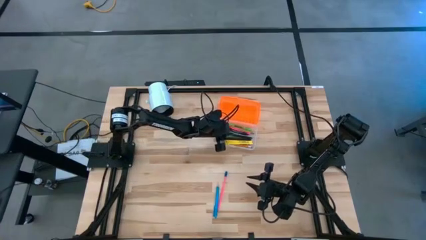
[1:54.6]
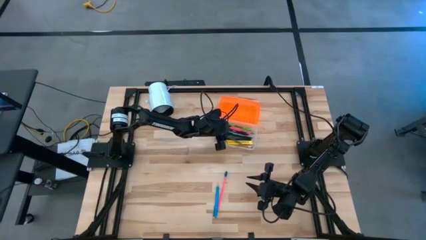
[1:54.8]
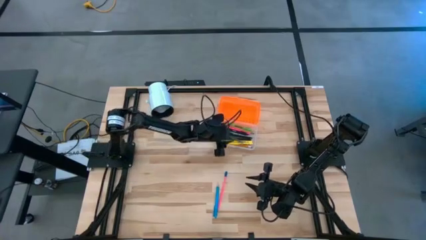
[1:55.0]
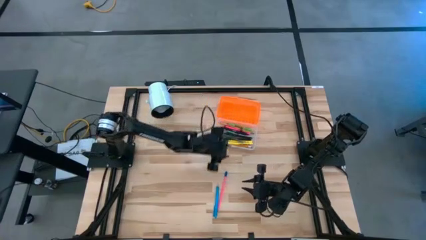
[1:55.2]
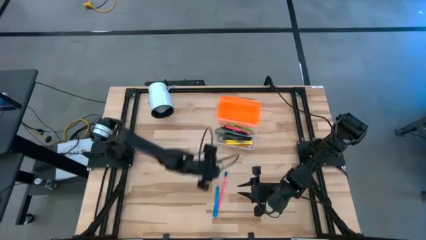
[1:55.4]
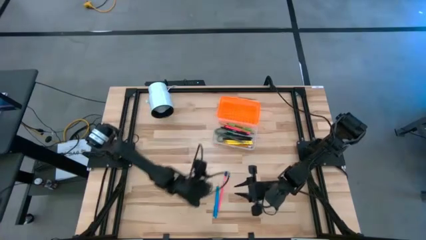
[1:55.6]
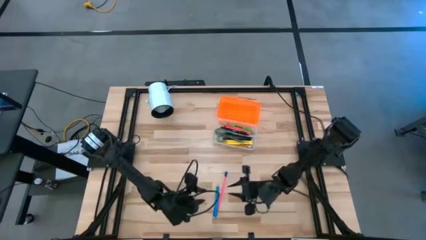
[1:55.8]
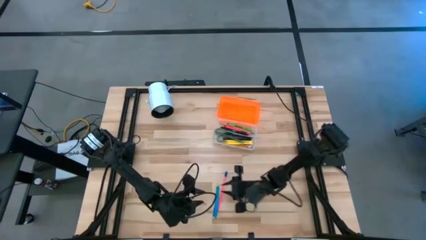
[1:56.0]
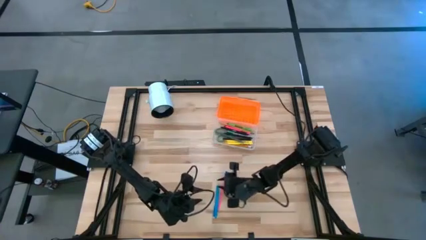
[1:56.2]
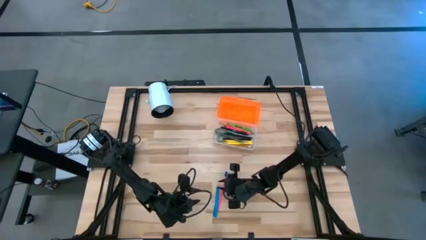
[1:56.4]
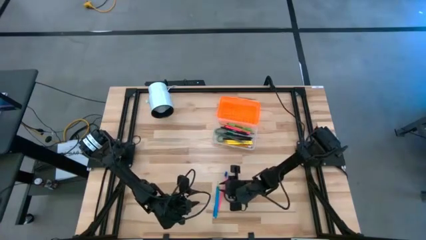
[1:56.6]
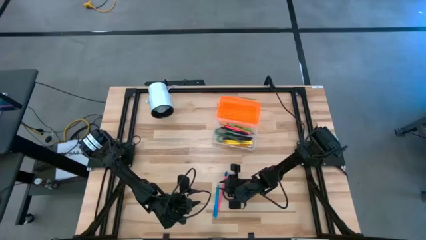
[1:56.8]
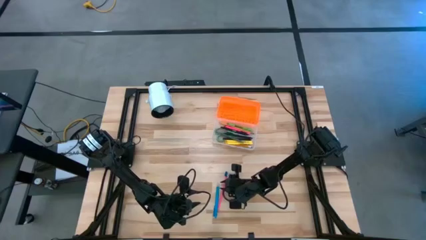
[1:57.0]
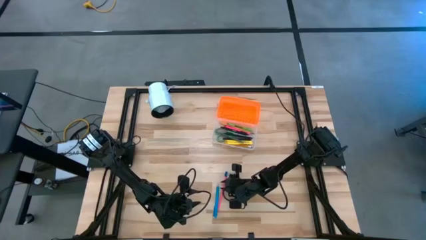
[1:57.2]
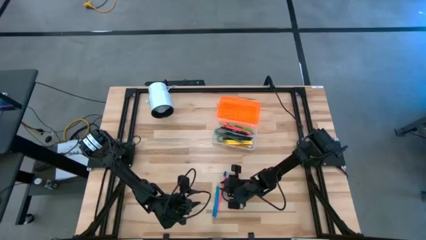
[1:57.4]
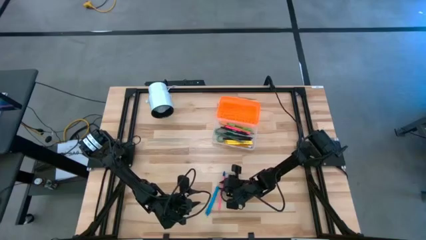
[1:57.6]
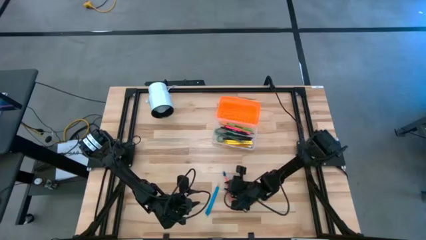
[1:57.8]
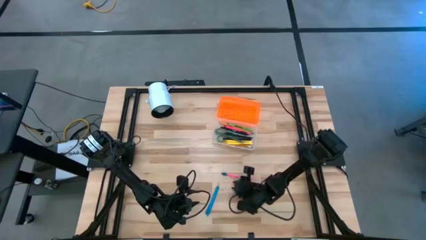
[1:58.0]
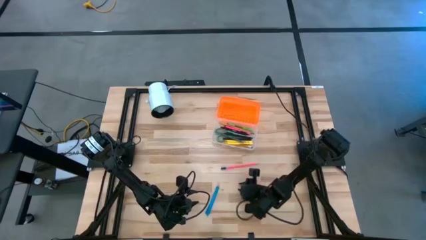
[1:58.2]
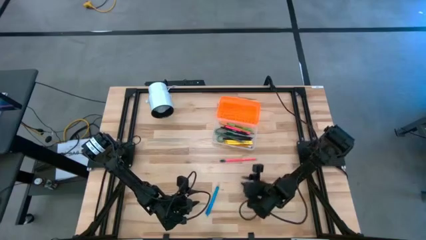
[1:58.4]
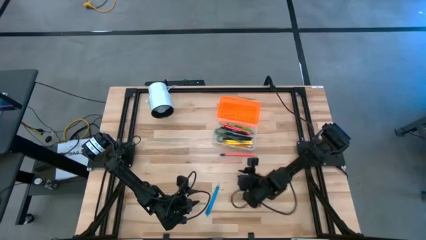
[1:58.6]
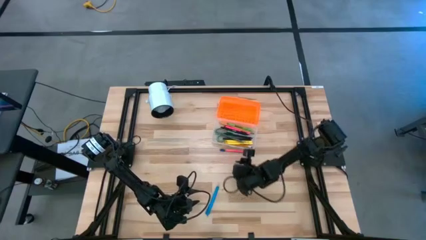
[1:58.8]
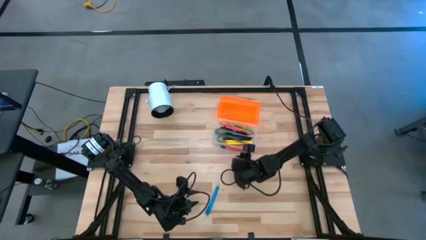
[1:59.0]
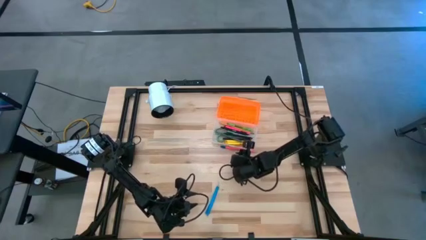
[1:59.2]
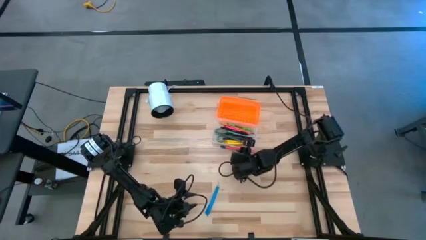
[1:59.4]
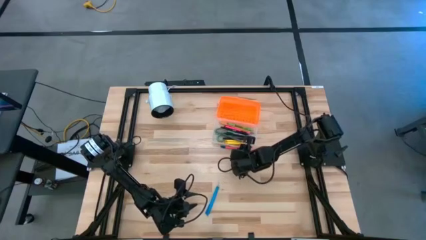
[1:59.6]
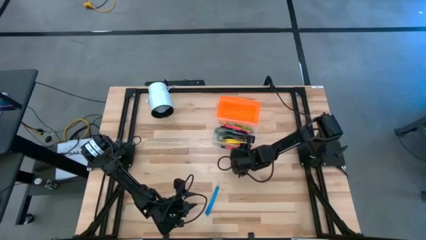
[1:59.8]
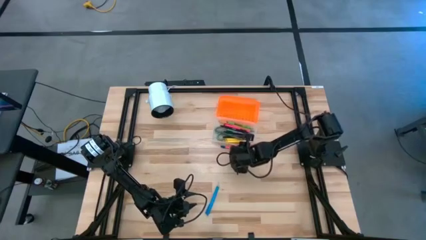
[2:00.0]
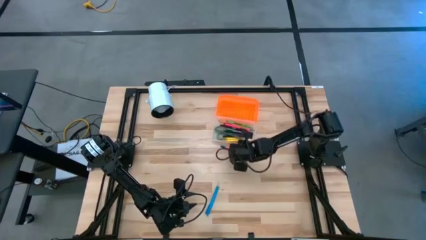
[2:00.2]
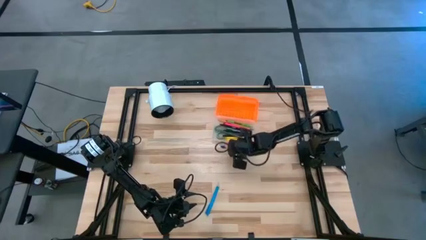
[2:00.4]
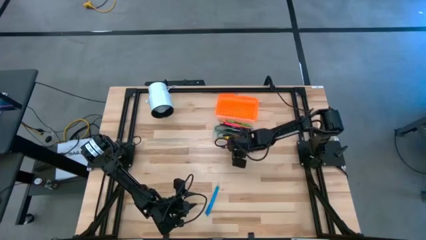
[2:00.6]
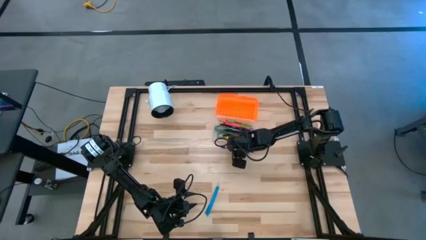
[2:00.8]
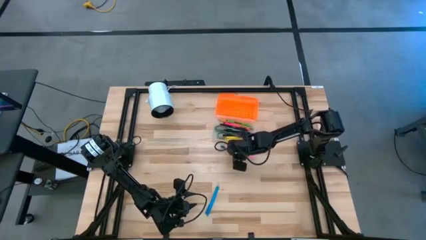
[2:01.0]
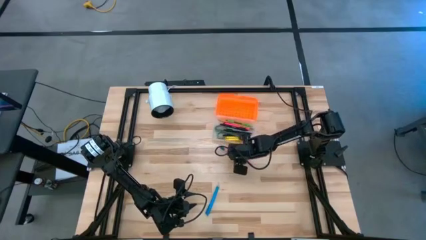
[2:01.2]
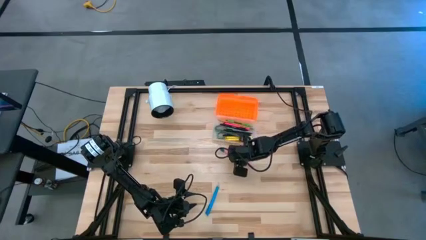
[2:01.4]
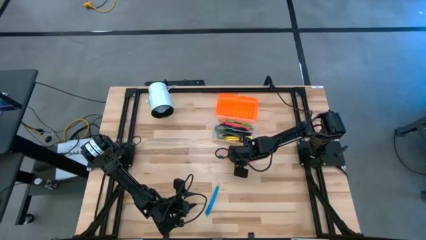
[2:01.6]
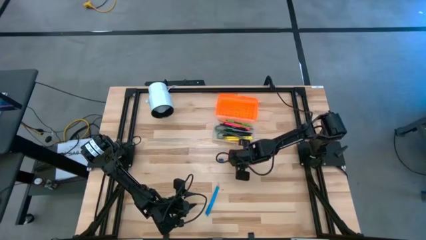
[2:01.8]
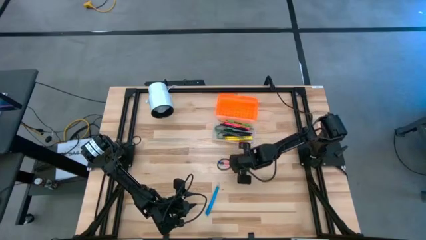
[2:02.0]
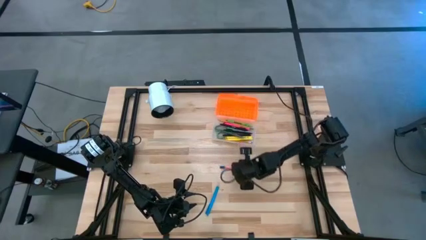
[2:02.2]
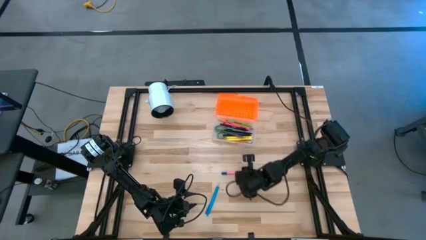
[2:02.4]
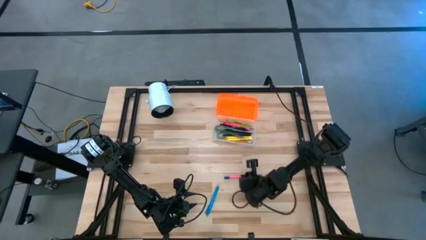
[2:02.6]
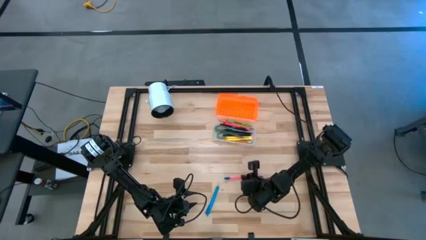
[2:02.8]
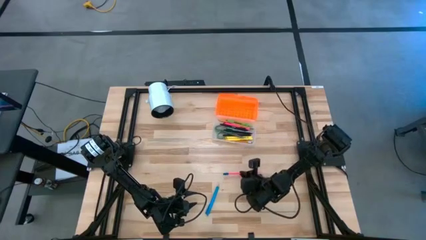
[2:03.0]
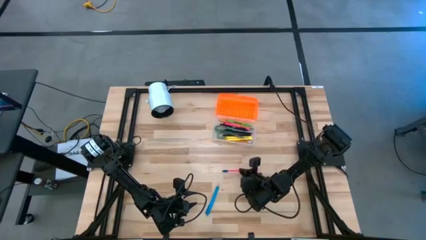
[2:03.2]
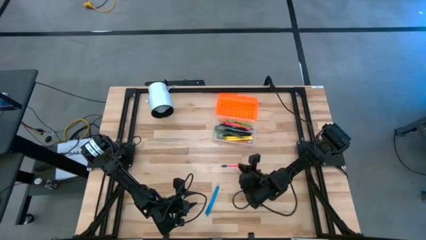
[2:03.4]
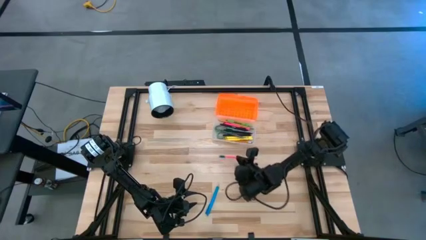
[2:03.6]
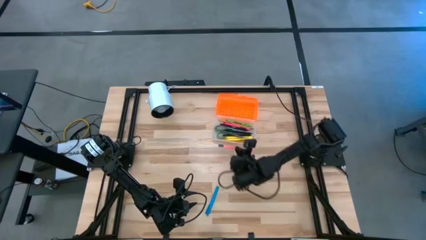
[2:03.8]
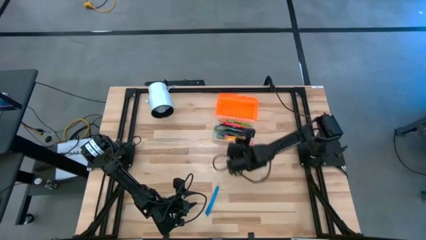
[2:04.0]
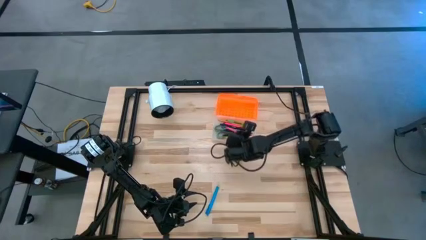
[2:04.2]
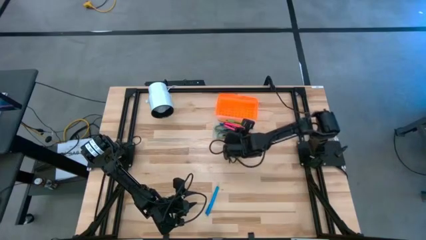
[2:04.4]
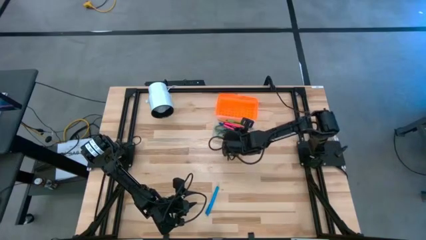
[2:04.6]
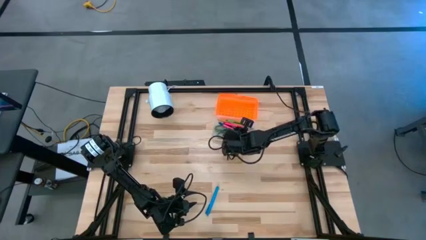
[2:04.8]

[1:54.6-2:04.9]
Task: Pick & place school supplies into a supply box
Put the pink pencil into the supply box

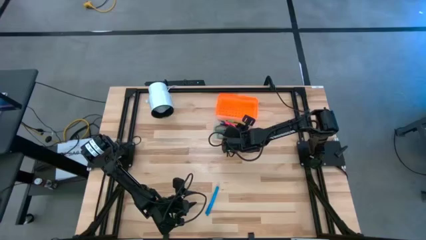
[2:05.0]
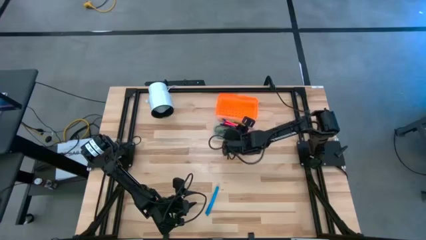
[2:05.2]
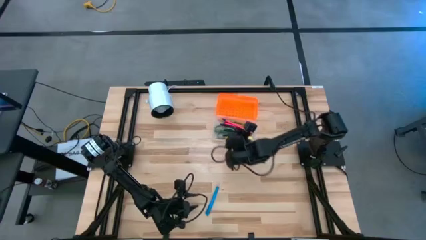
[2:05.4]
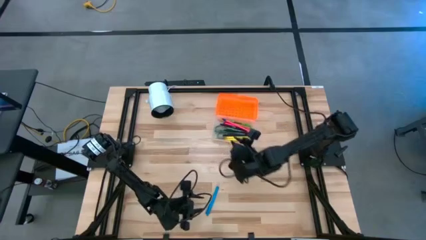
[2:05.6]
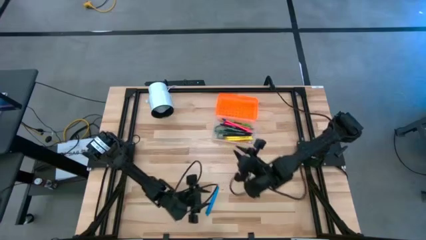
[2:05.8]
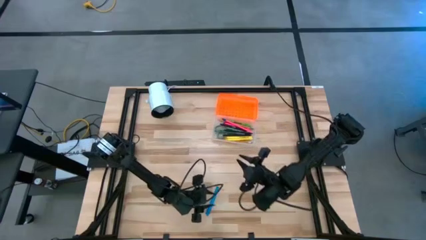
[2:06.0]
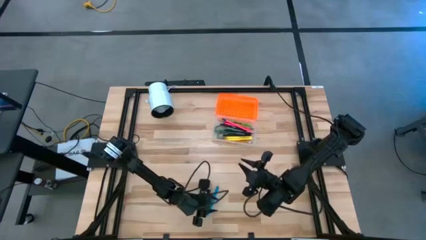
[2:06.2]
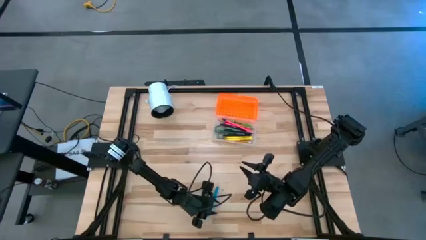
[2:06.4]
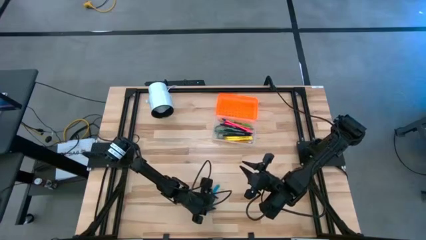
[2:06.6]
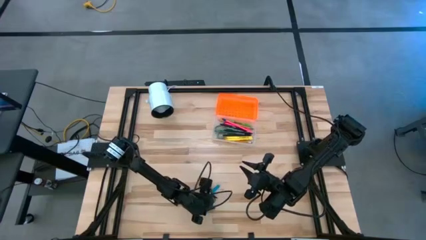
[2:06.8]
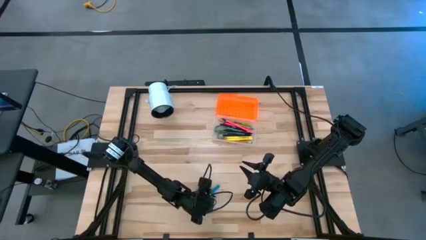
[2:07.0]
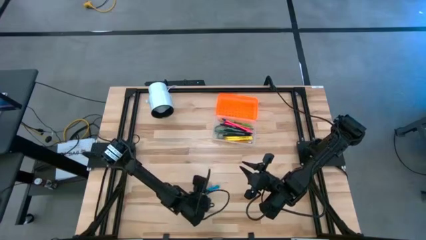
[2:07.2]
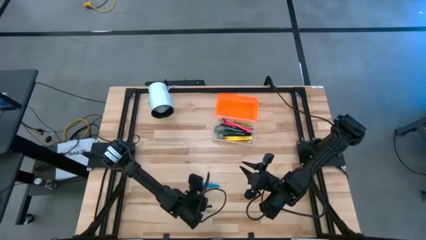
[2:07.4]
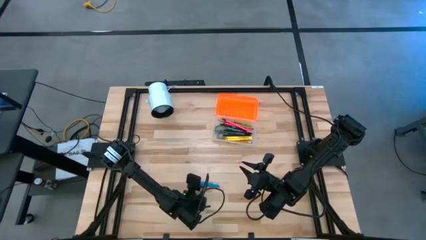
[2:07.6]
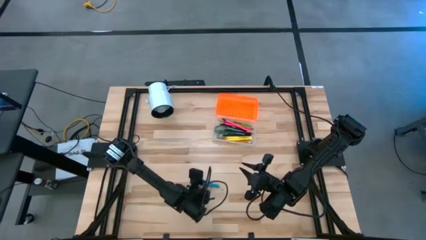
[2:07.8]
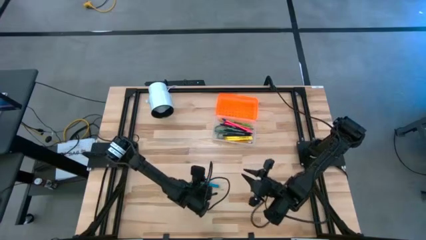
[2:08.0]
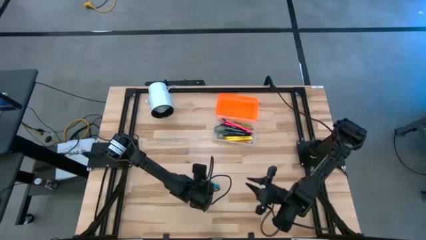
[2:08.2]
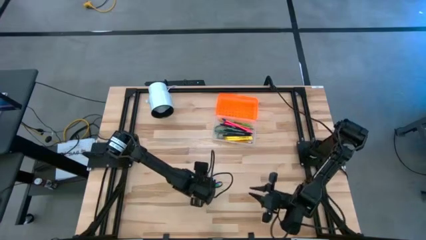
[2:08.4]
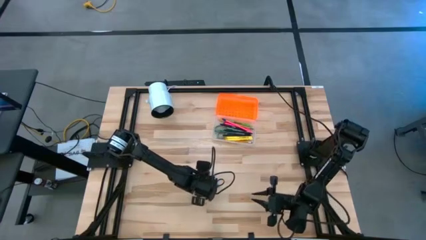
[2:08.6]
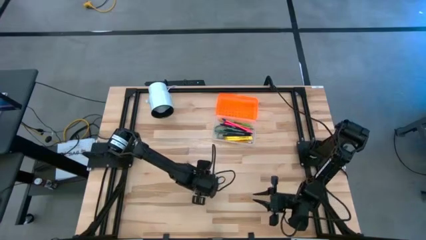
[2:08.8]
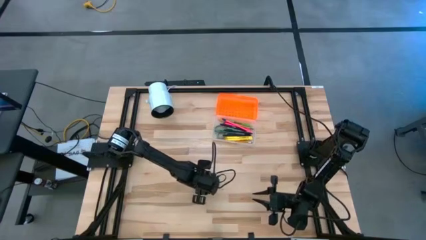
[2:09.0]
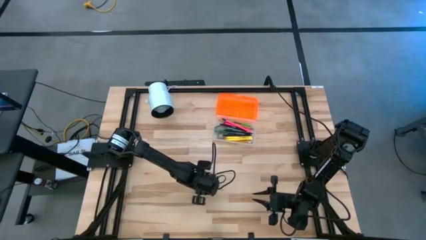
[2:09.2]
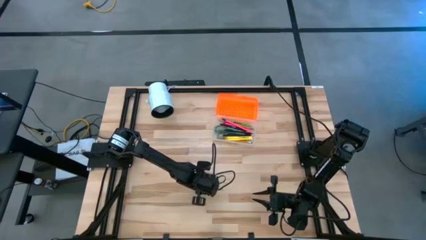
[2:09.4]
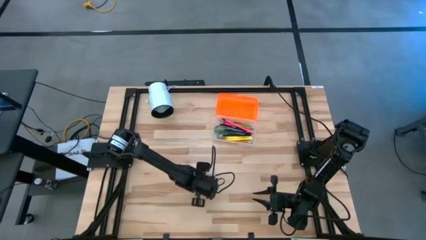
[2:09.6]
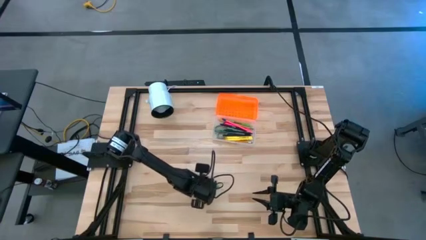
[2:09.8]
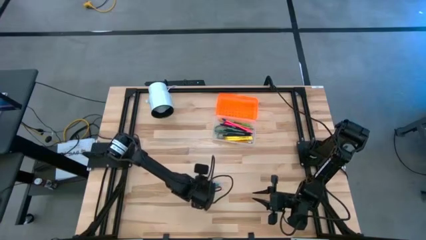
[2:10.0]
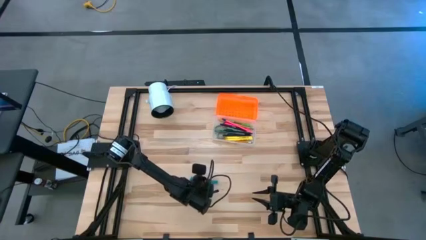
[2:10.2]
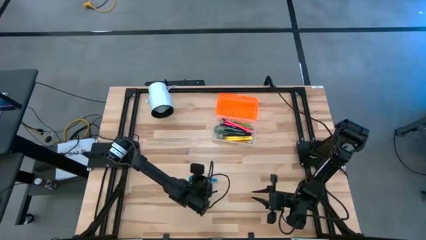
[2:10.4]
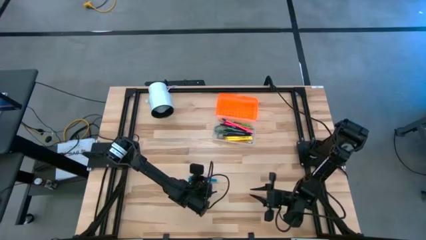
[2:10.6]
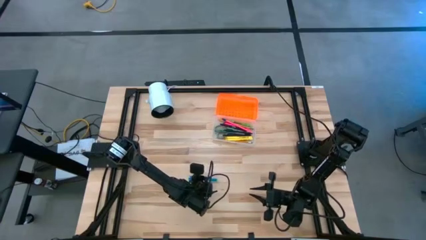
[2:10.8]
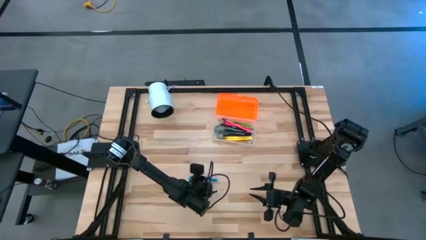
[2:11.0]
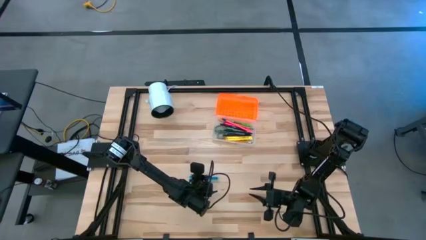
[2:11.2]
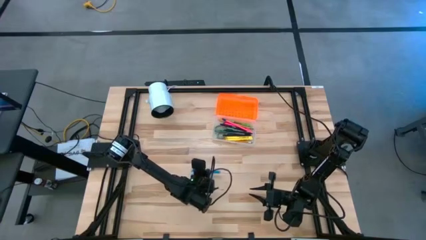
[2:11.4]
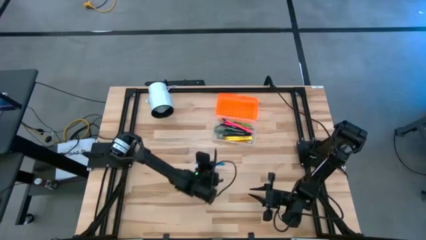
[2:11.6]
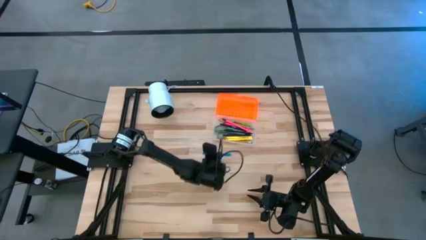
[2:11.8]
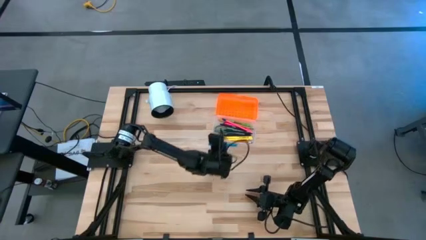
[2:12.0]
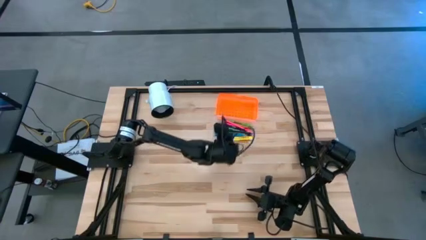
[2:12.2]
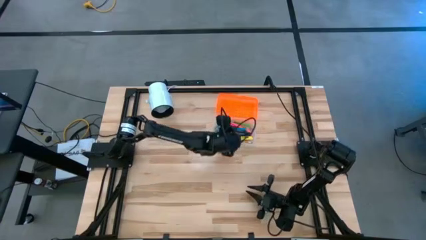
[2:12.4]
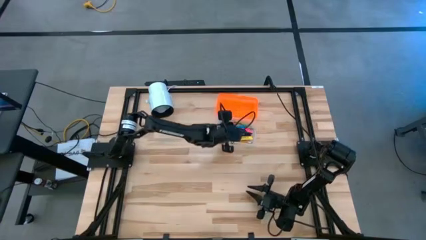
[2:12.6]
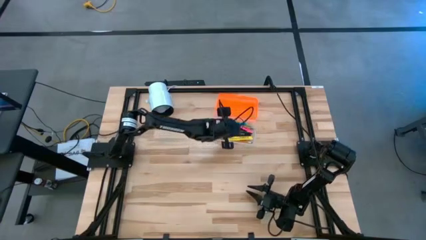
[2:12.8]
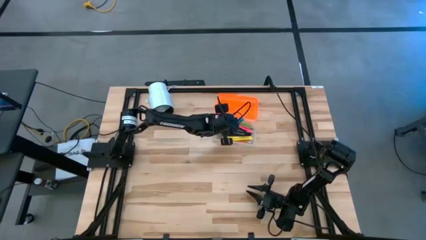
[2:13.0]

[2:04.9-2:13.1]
Put the blue pen into the supply box
